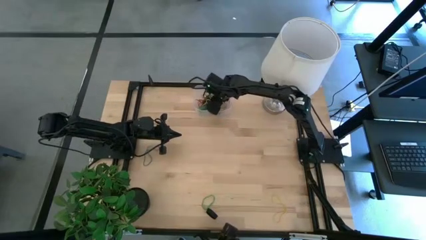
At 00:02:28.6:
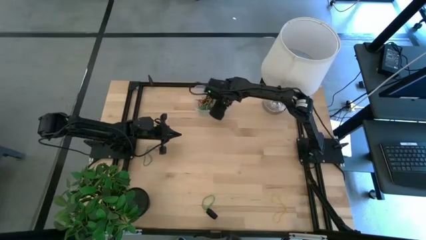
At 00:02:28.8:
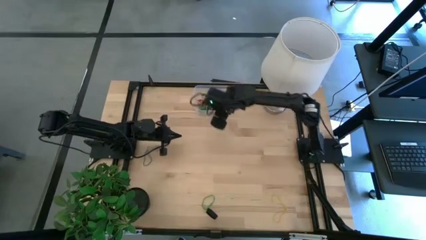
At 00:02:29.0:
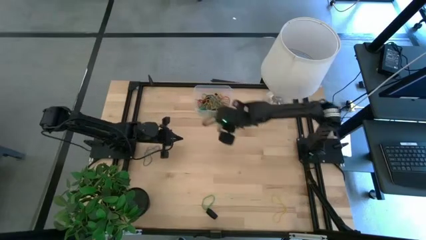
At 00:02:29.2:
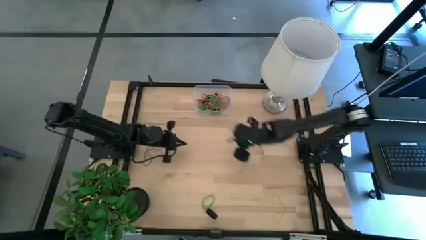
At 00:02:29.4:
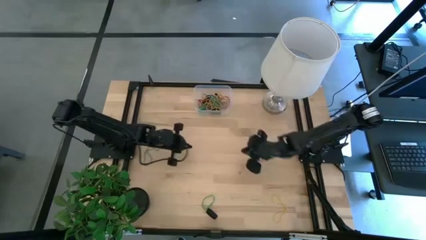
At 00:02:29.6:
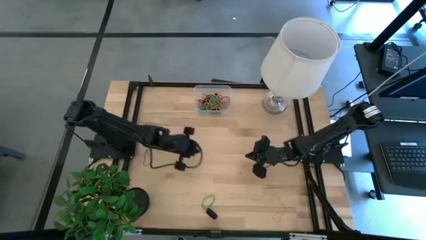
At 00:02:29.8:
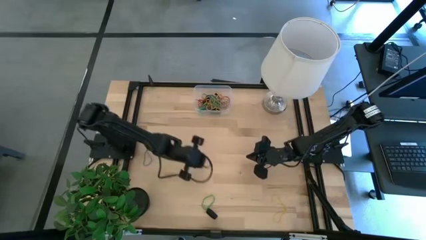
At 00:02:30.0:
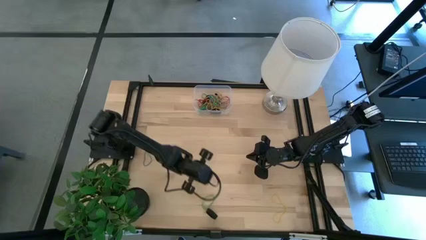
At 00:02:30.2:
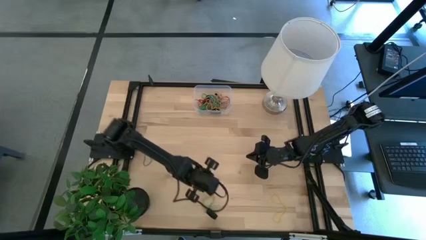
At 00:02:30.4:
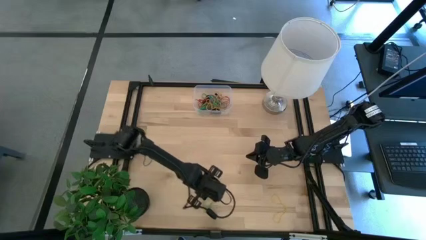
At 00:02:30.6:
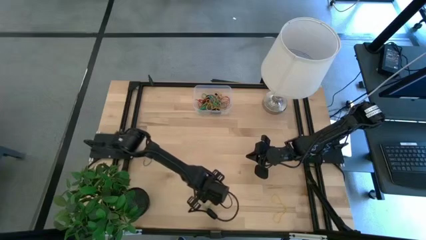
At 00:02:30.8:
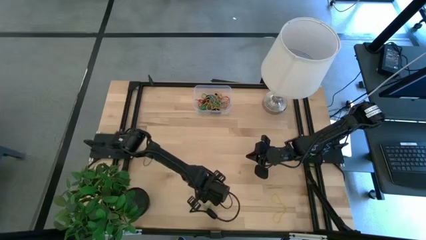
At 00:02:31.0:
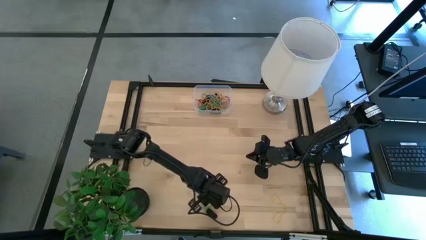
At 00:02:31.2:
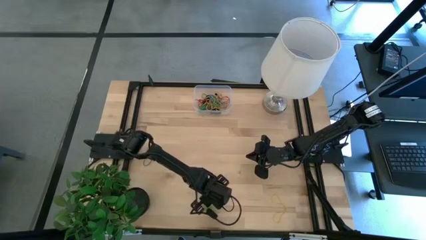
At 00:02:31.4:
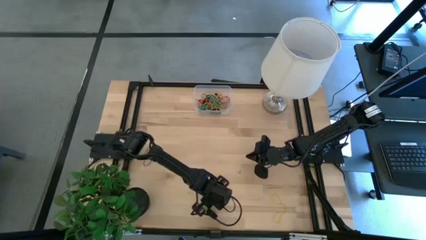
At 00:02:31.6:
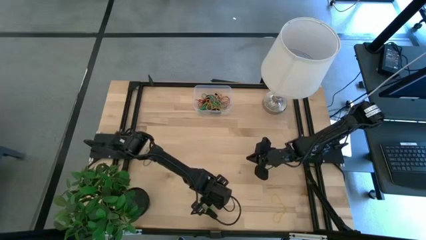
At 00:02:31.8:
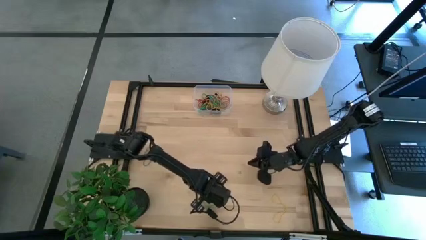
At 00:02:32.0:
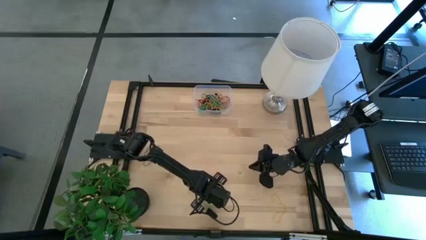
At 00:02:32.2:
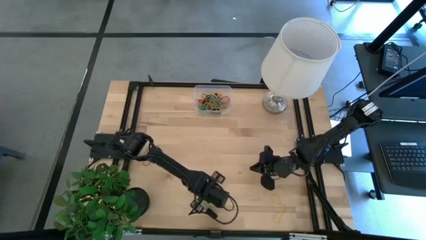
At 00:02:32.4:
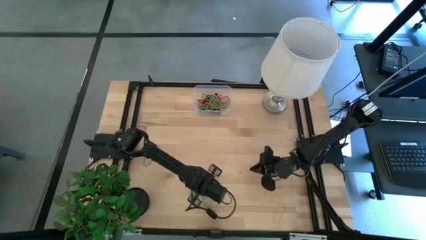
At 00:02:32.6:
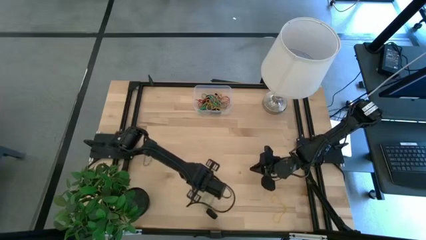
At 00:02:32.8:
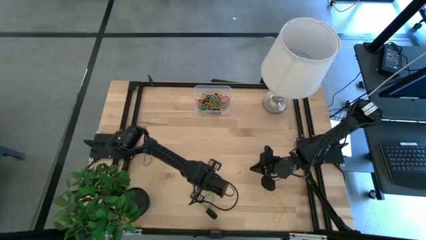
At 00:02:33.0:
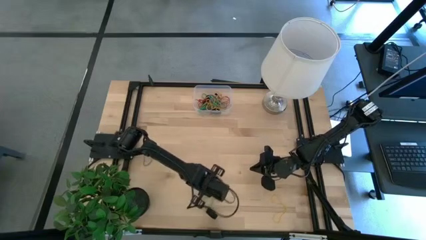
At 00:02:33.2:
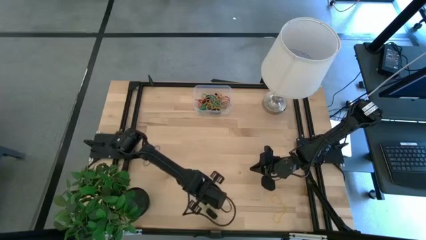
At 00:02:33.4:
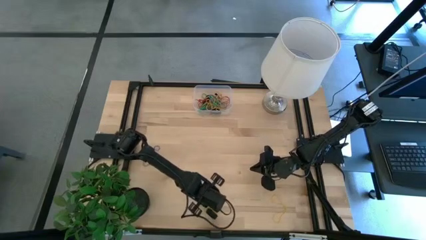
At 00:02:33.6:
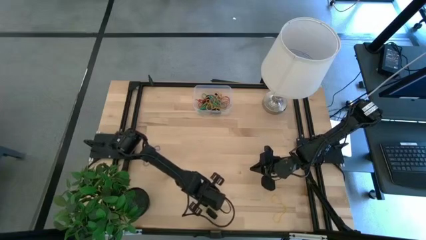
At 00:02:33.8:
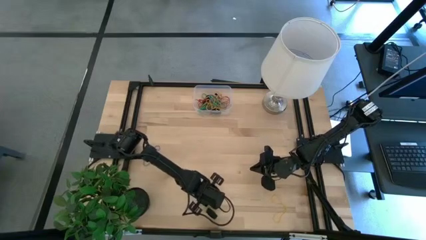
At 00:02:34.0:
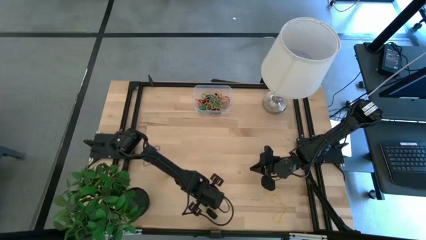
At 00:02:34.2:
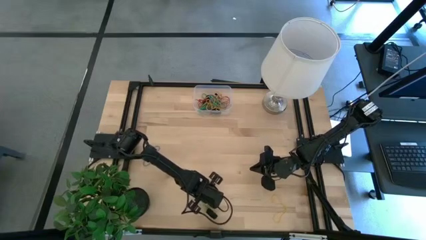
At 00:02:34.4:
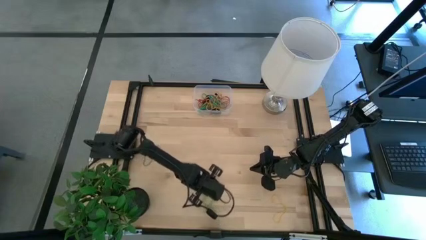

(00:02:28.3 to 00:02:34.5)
Task: Pick and place rubber bands into bin
Put the green rubber band into the transparent bin

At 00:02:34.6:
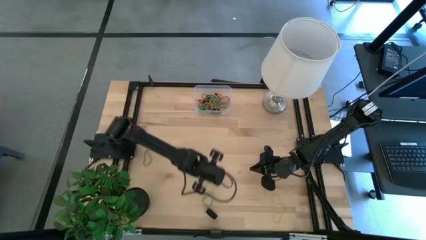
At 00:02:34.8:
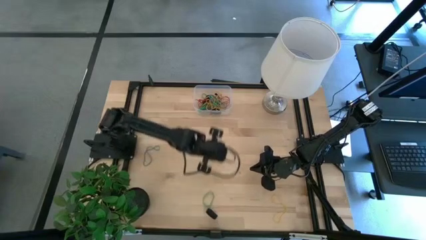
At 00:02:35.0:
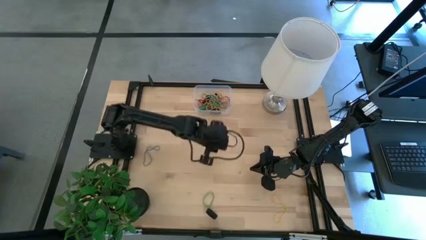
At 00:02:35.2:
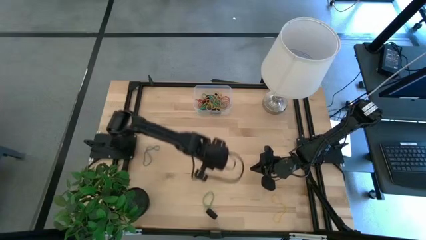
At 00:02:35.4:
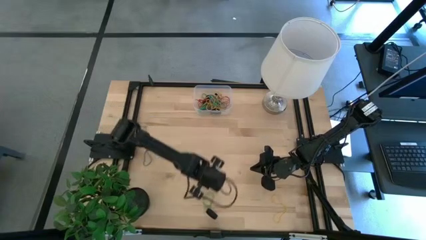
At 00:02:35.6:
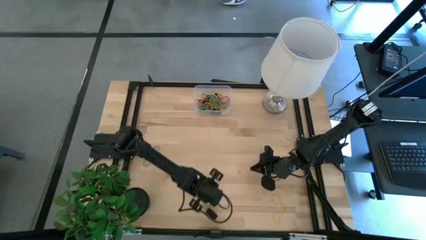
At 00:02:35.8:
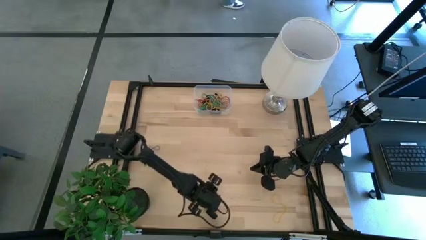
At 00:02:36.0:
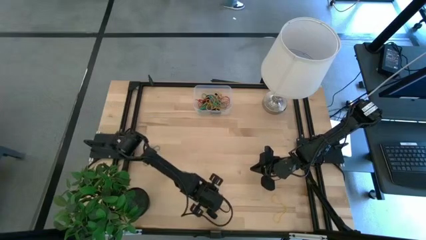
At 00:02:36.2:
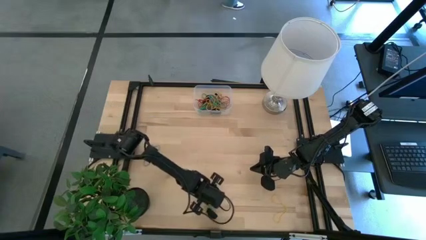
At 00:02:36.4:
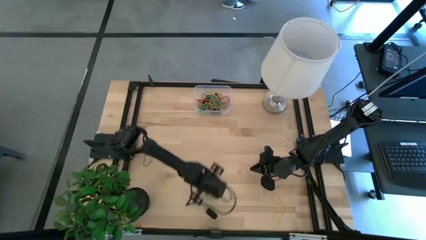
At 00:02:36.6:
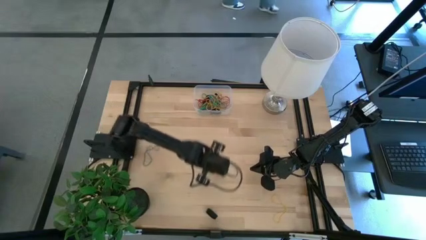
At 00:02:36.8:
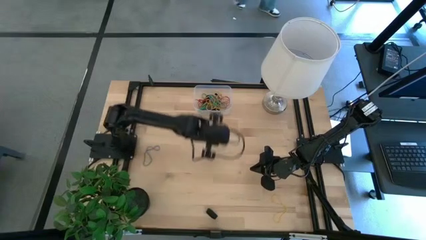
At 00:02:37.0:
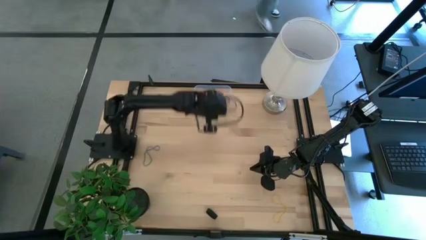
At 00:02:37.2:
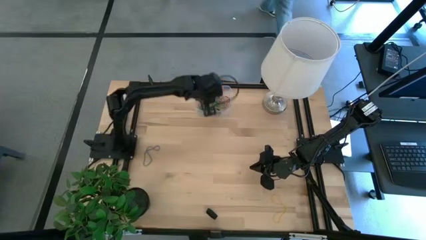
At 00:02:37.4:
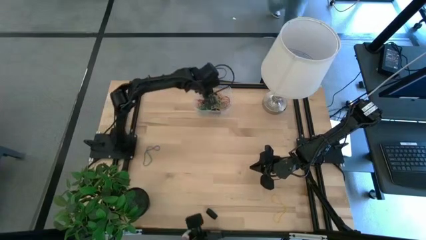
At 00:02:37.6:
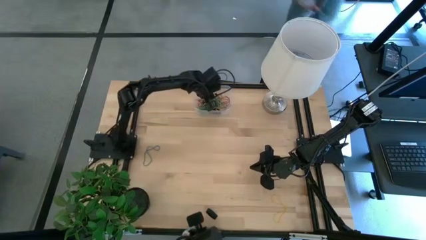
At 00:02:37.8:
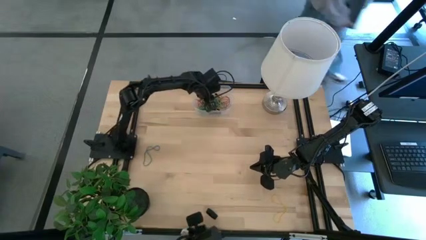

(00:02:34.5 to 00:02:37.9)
Put the green rubber band into the transparent bin

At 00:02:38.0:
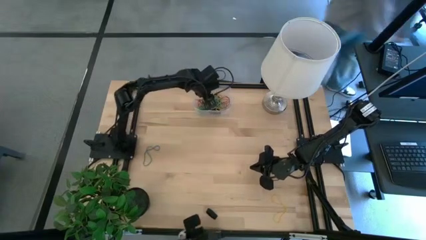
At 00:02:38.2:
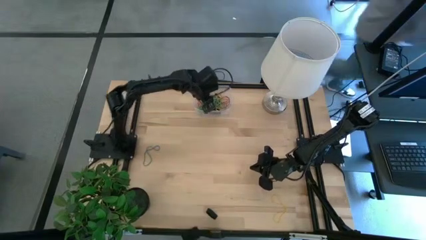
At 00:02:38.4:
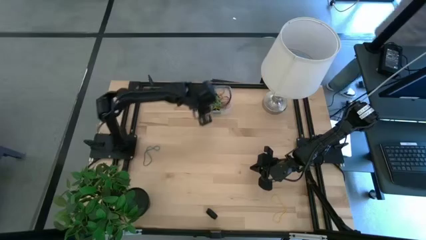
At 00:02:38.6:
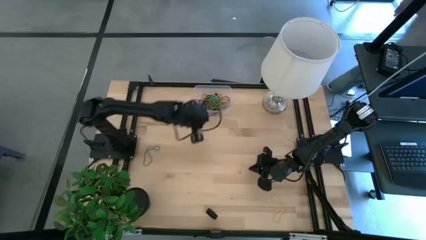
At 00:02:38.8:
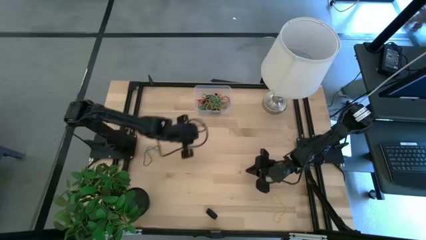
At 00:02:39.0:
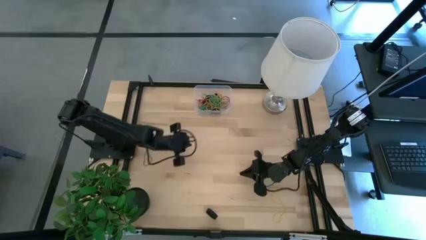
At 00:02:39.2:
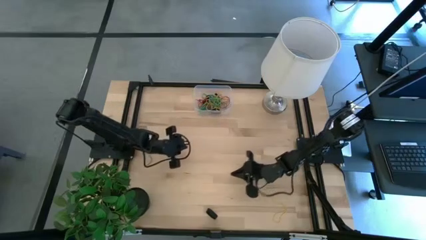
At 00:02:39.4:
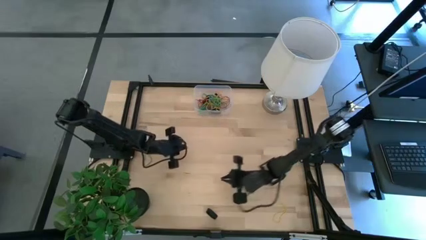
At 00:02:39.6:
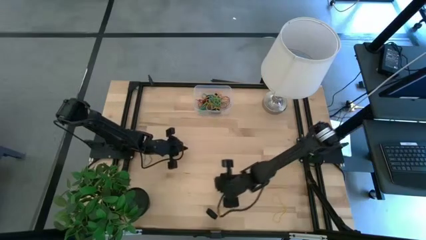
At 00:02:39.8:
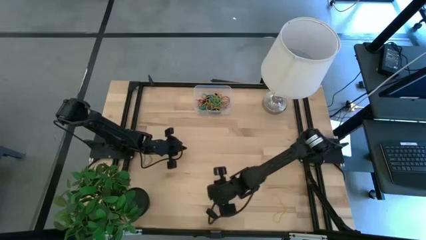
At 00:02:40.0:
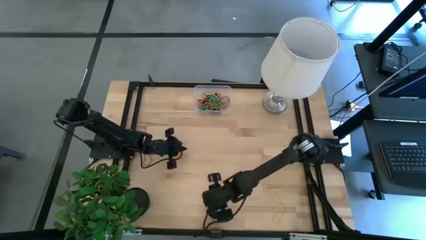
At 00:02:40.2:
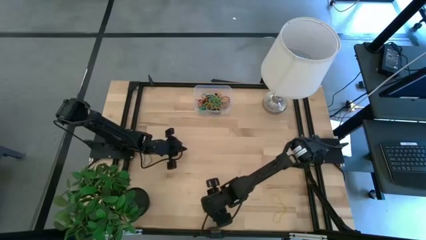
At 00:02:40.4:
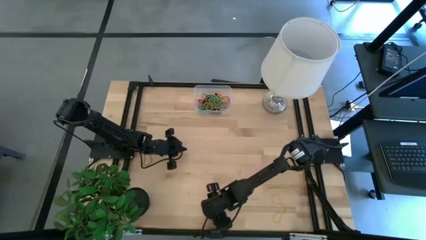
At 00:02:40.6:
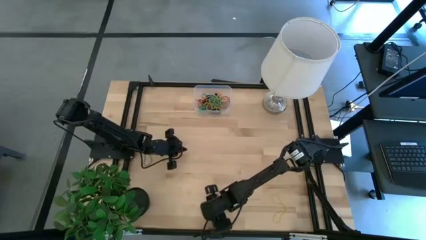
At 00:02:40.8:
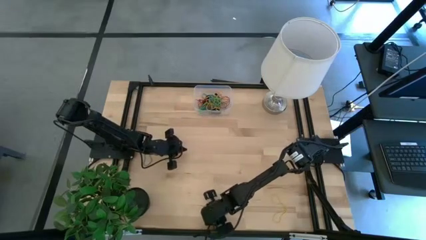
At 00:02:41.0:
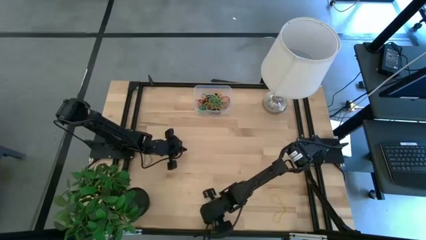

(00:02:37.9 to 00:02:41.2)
Put the black rubber band into the transparent bin

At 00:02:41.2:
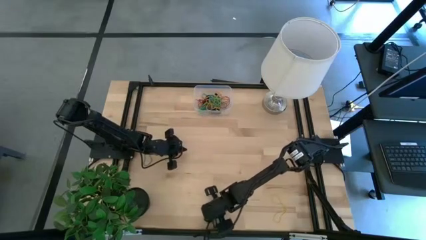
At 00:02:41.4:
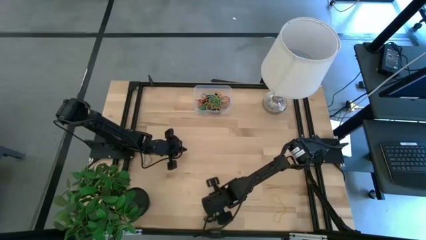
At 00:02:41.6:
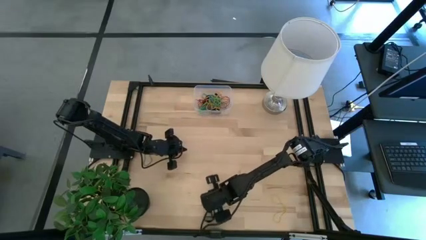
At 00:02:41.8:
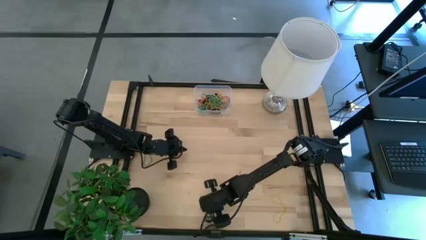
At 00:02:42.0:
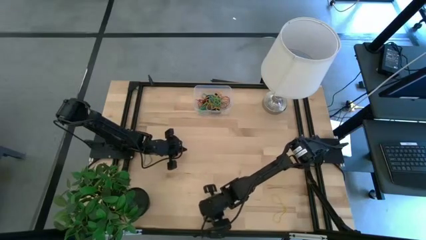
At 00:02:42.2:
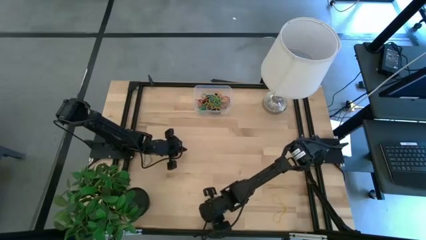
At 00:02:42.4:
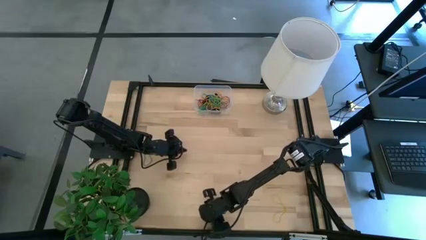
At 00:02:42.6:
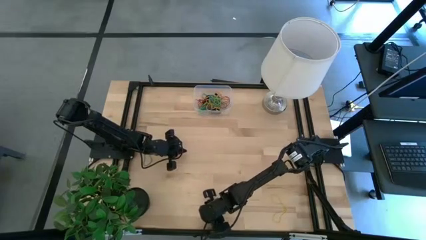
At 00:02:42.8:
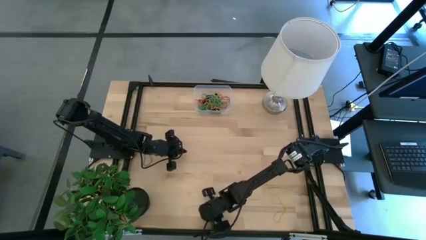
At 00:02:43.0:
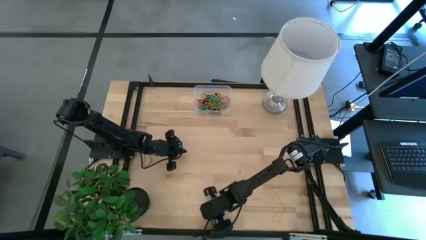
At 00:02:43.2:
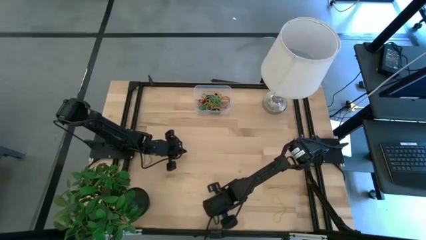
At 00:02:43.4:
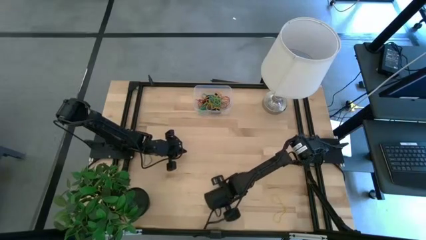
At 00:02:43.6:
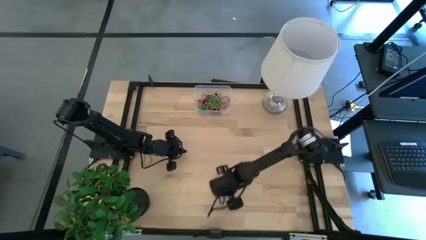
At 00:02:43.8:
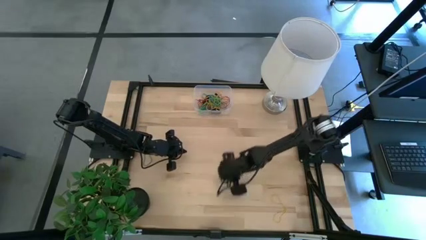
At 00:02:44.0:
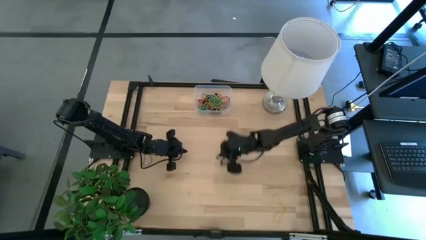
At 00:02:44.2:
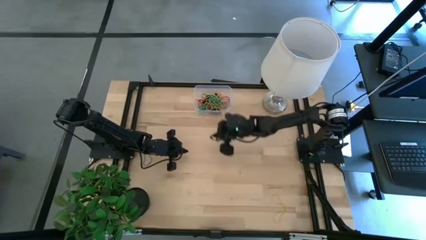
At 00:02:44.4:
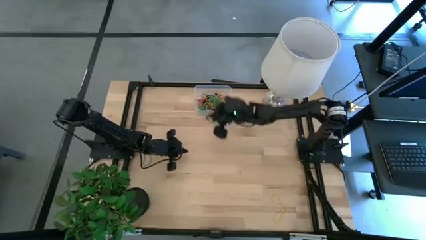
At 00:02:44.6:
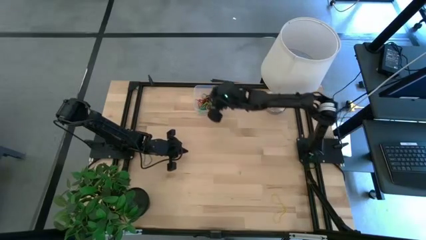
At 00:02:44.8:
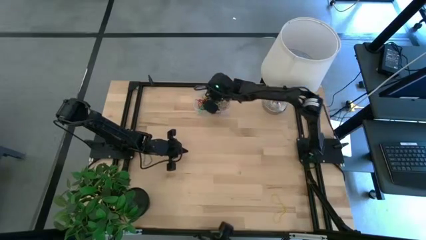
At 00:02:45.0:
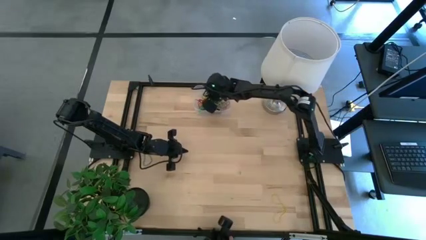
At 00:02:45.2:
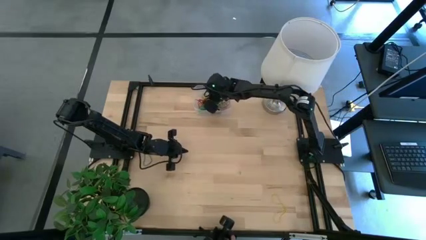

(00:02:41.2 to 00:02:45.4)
Put the black rubber band into the transparent bin
